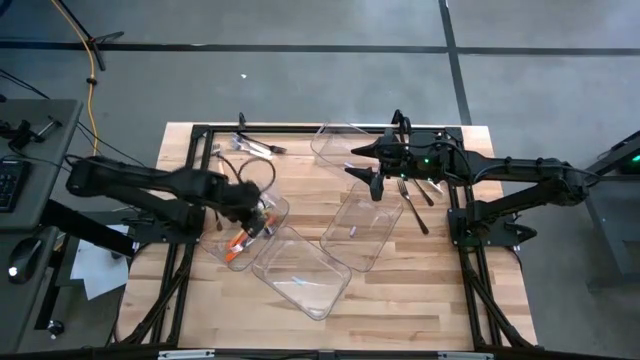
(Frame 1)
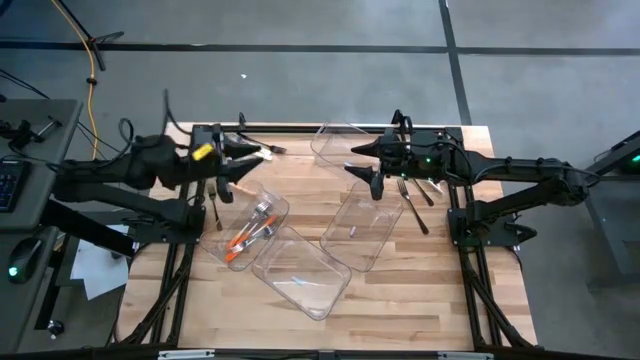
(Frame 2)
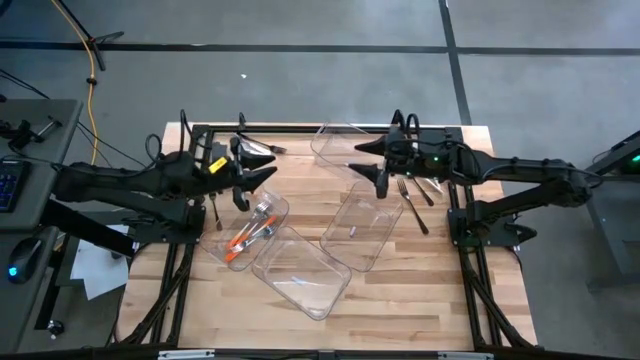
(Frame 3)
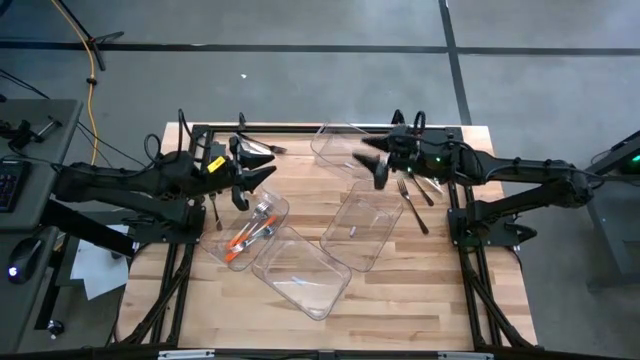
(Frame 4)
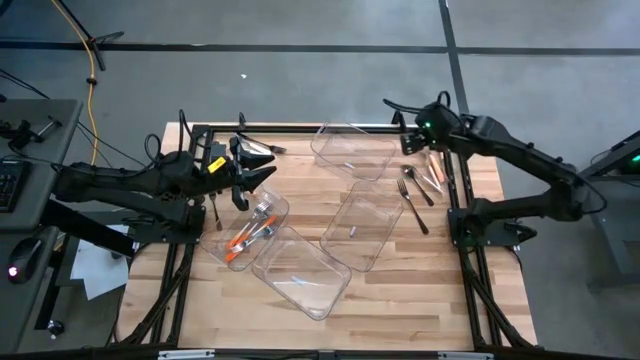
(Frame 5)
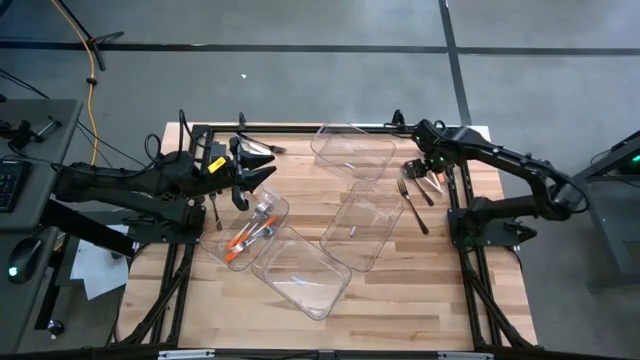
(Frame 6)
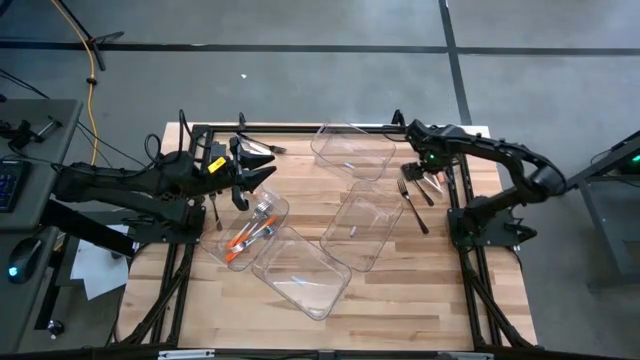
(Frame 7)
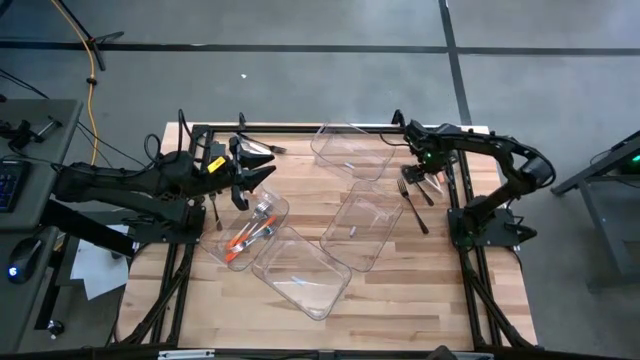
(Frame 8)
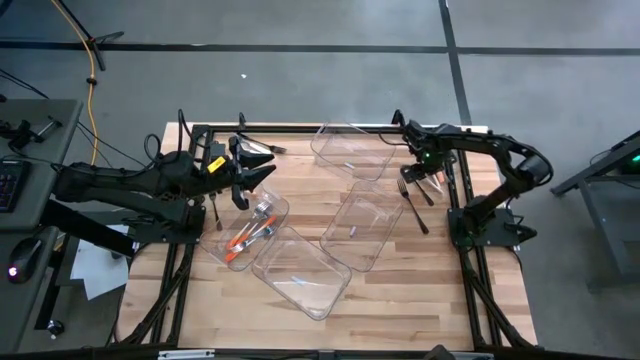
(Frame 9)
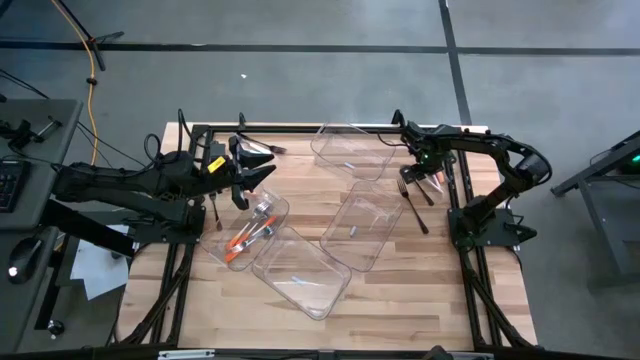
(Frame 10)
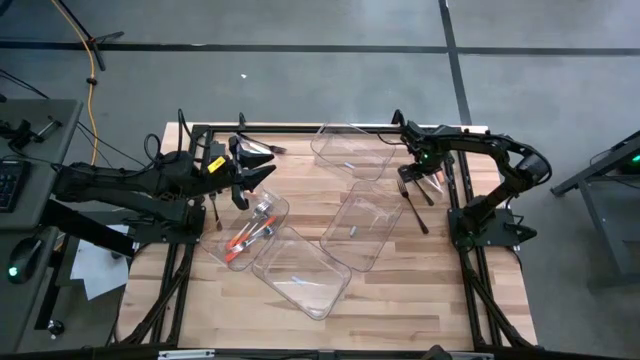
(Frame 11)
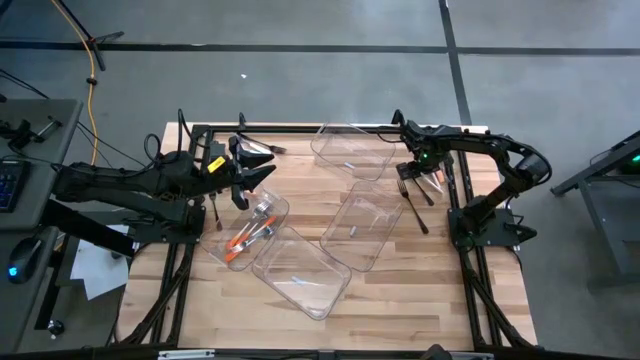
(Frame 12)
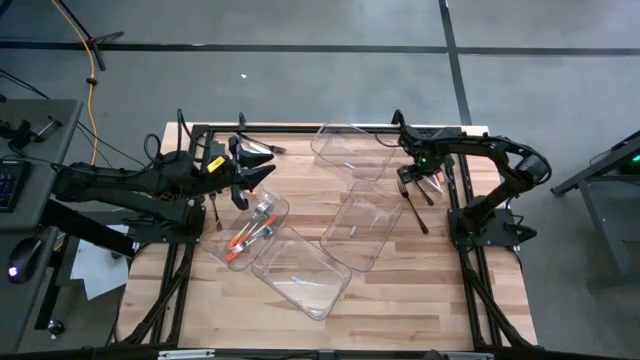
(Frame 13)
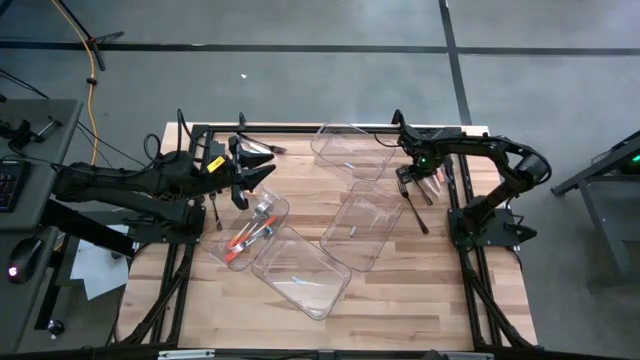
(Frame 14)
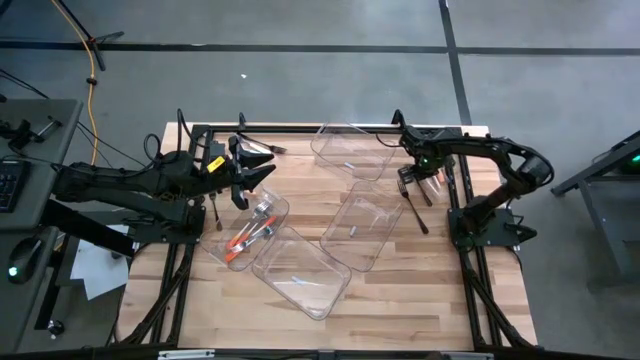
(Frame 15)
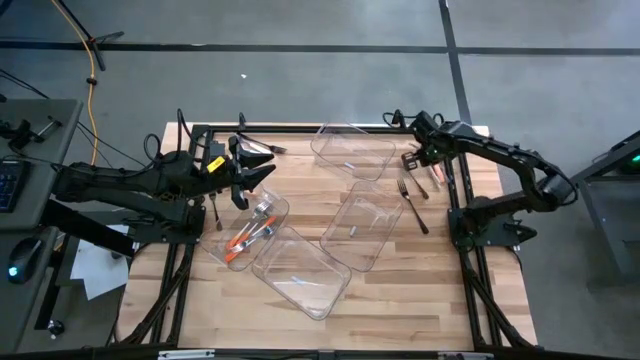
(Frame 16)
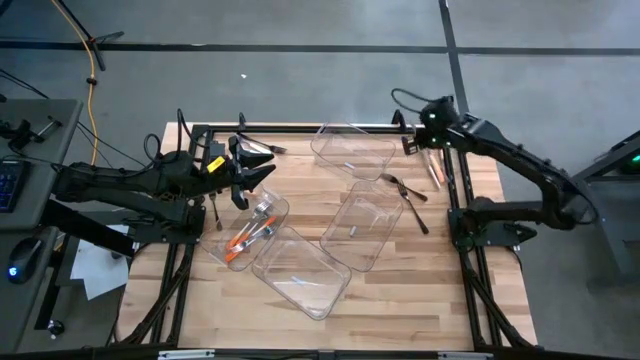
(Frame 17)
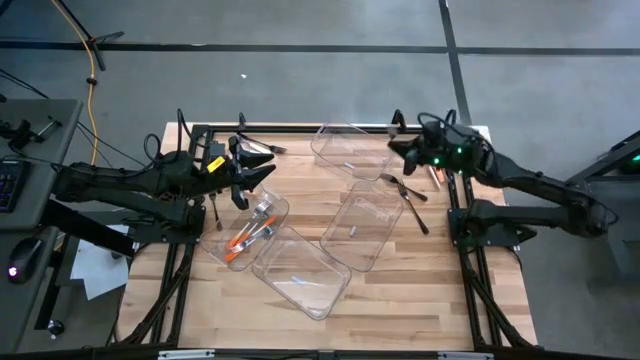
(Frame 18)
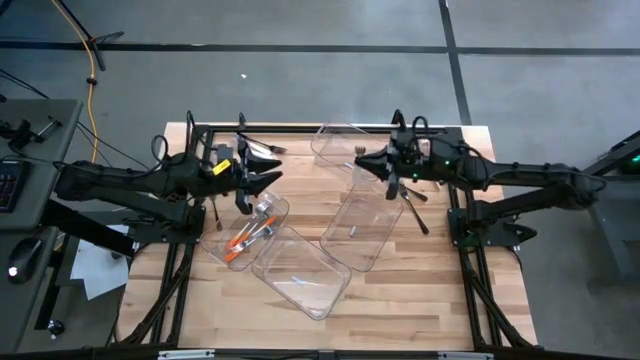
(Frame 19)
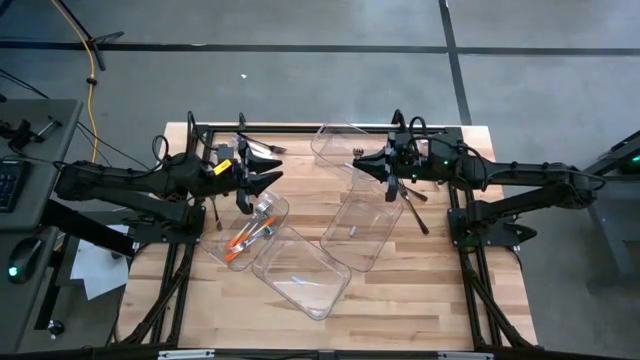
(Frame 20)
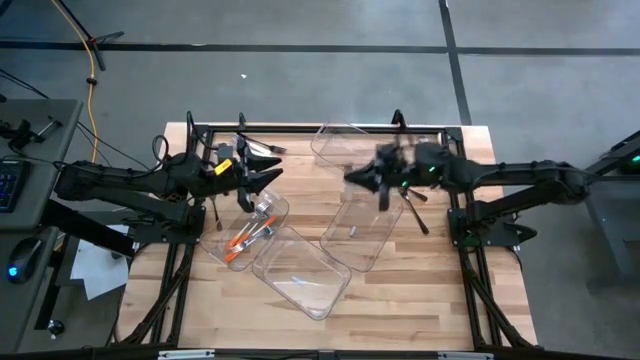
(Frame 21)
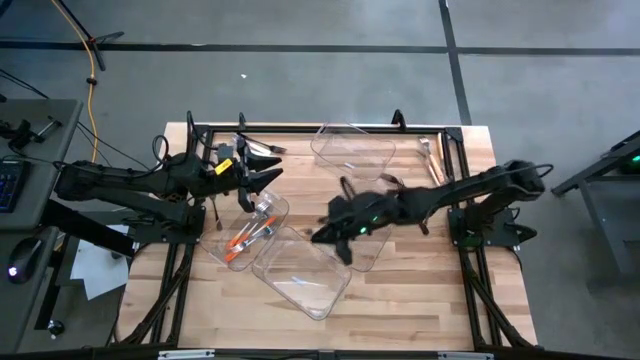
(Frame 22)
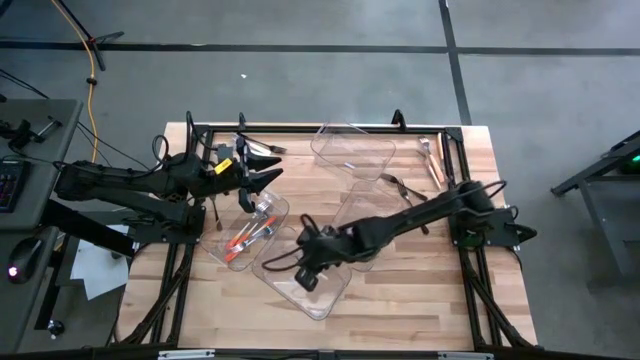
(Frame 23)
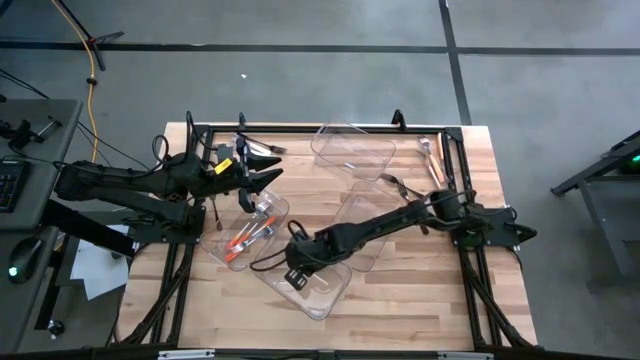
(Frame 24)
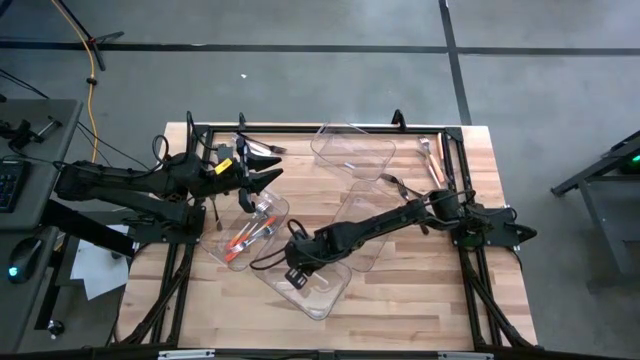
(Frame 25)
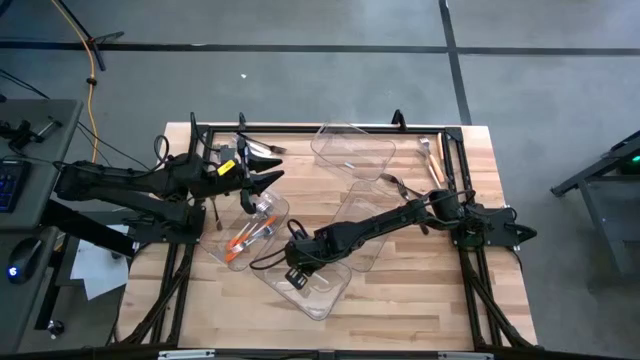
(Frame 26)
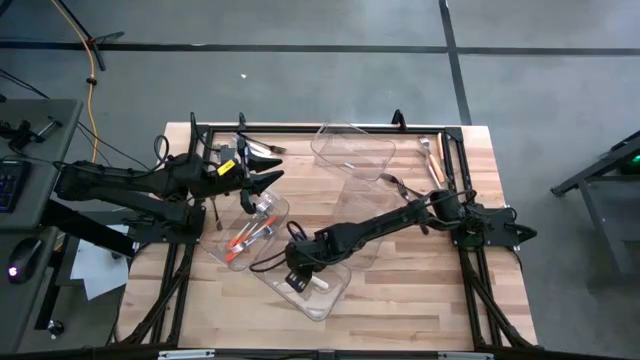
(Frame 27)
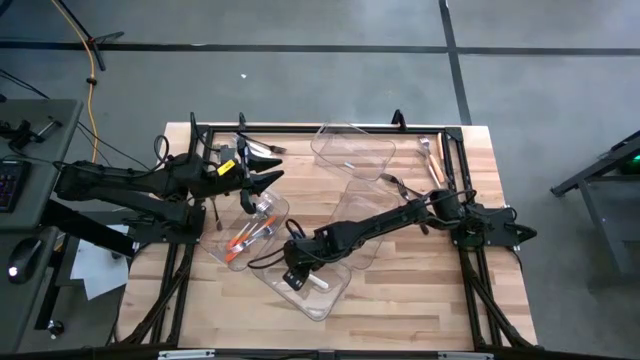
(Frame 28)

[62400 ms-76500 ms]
Task: Sort silverware by color (type)
Put the white fork into the bottom transparent bin

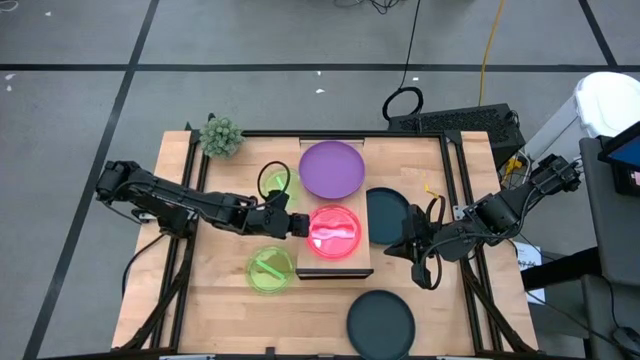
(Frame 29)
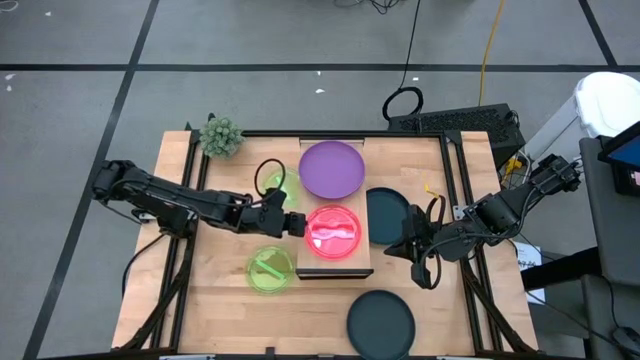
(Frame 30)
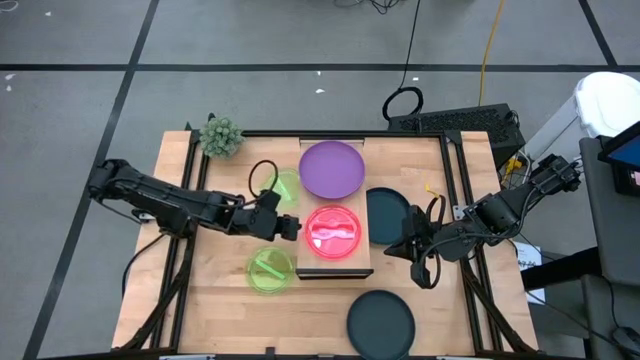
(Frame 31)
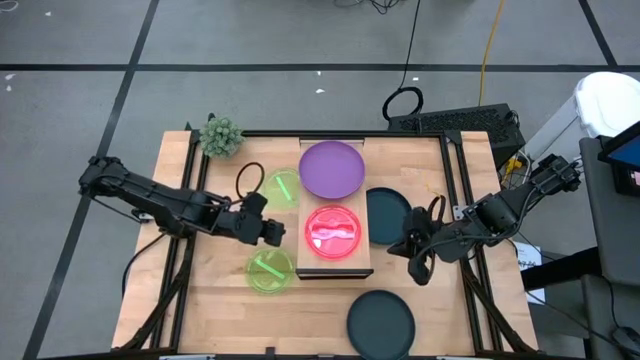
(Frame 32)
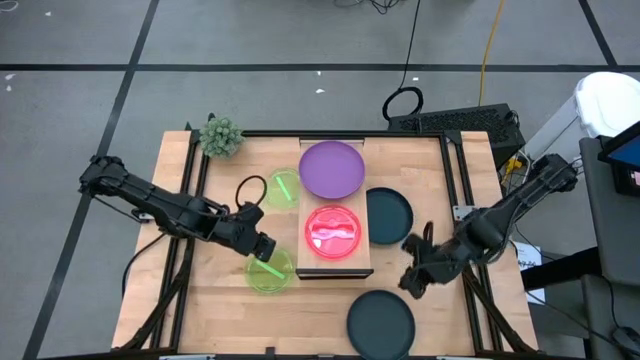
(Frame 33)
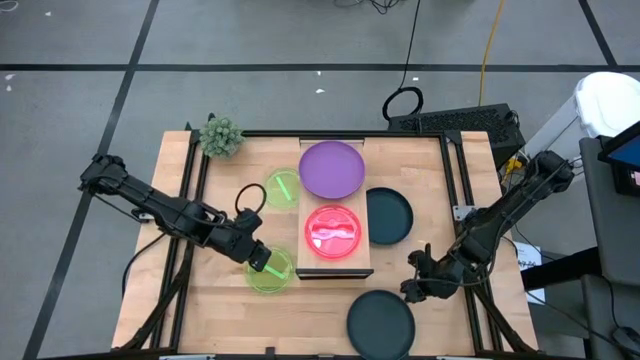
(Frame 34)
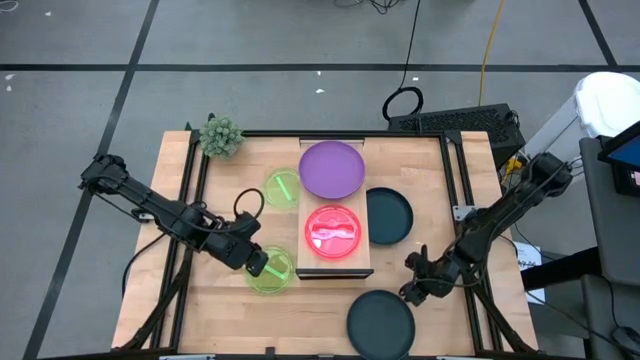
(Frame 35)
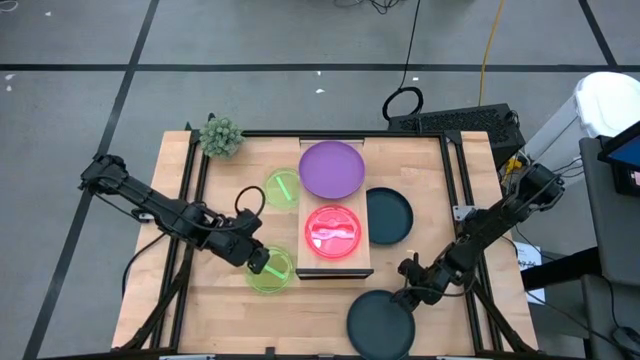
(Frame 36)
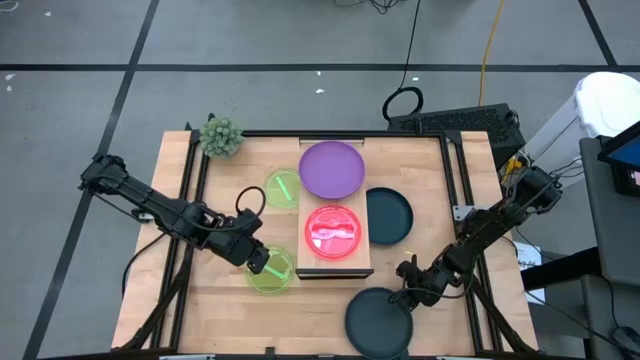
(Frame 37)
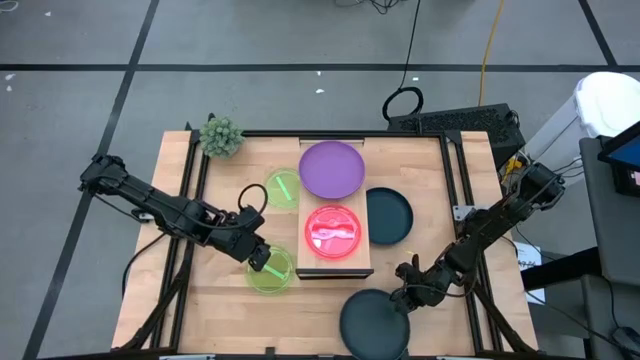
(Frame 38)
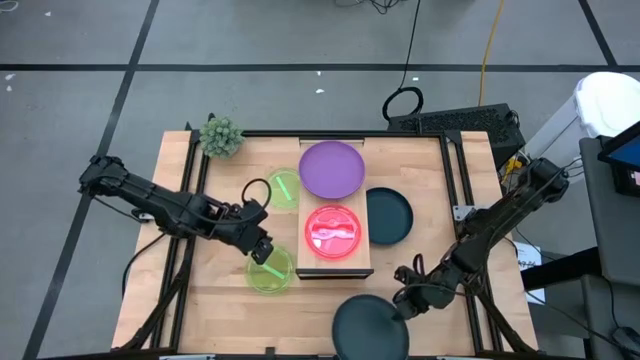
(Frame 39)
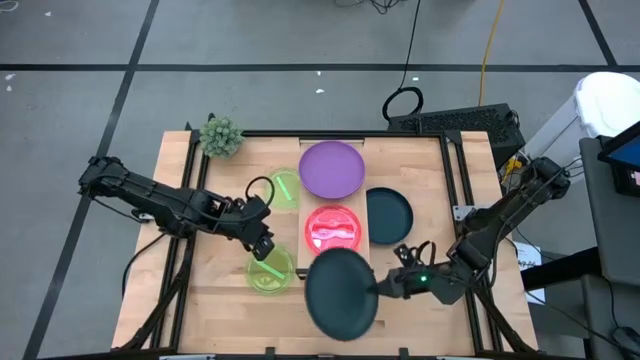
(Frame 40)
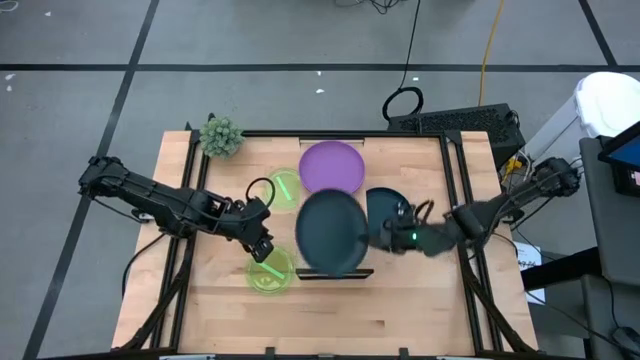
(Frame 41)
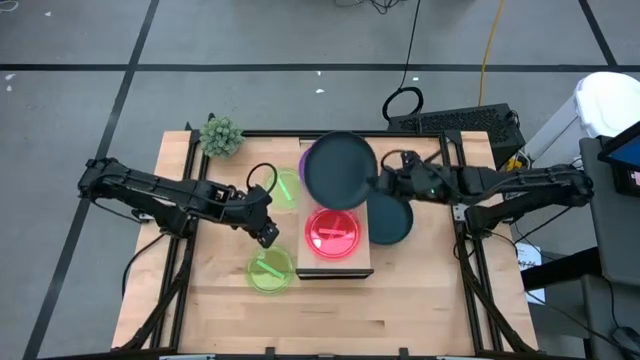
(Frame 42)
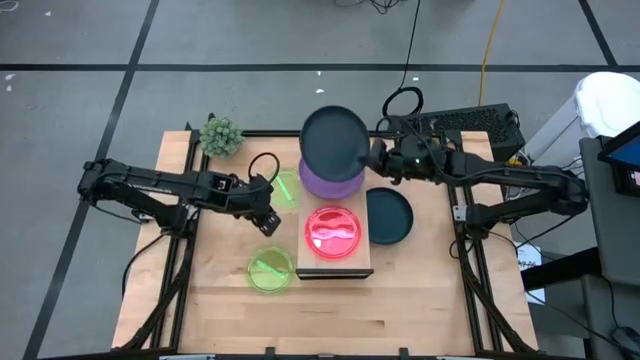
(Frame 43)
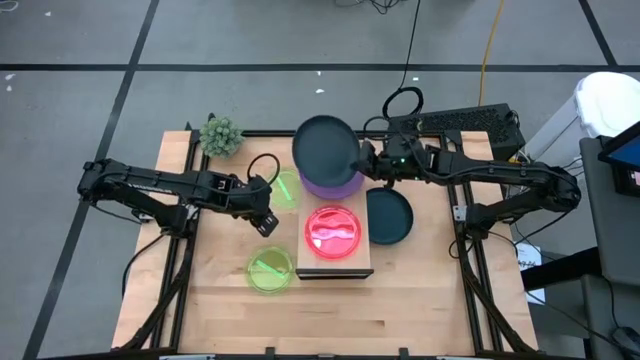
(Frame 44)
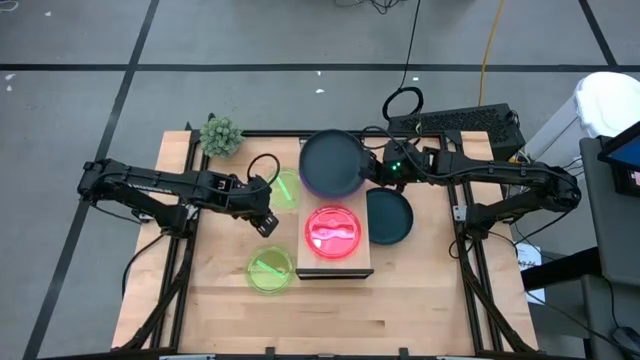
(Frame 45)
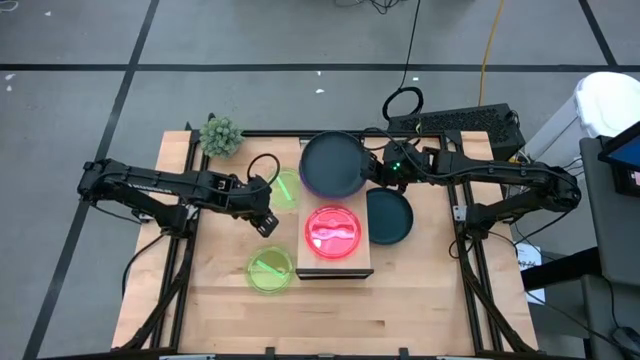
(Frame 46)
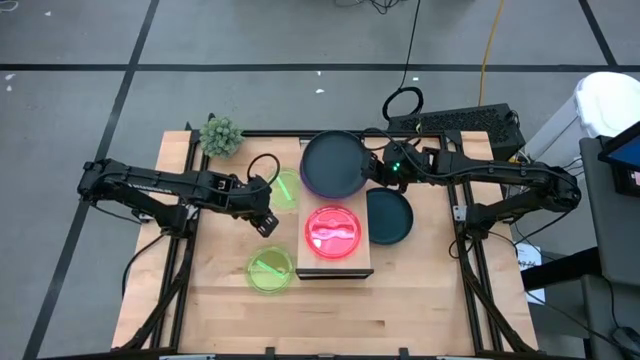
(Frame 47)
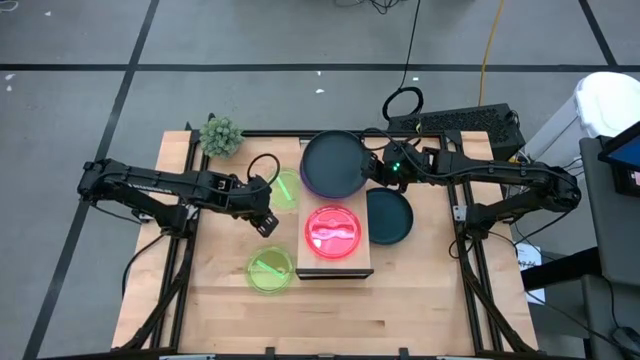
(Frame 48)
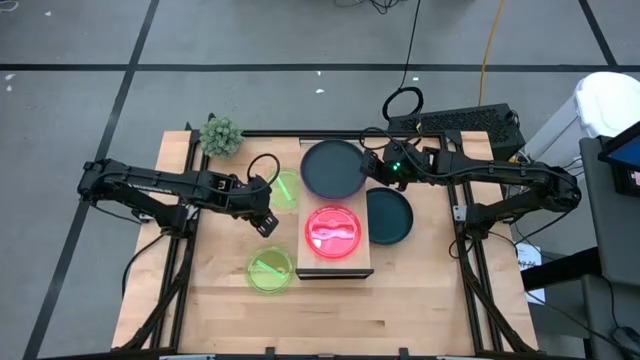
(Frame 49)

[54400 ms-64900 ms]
Task: Place and stack plates onto a shelf
Stack the bottom dark green plate on top of the purple plate on the shelf
